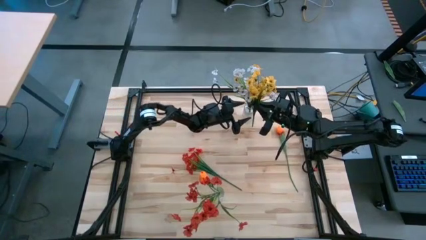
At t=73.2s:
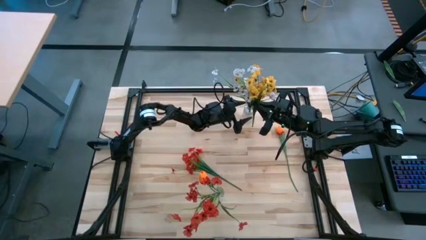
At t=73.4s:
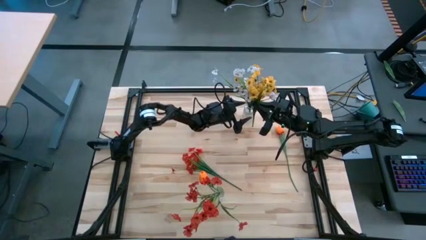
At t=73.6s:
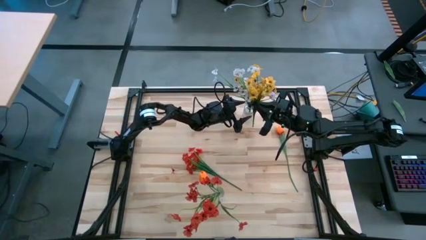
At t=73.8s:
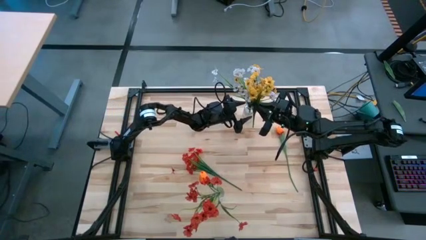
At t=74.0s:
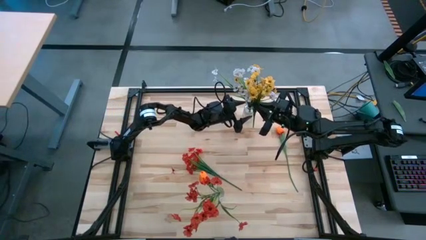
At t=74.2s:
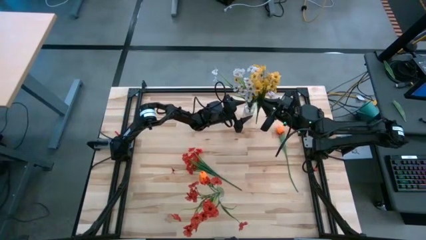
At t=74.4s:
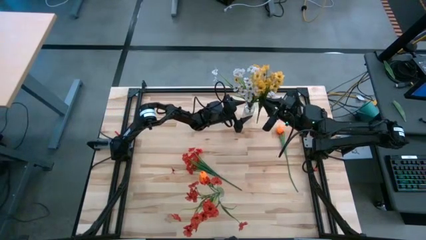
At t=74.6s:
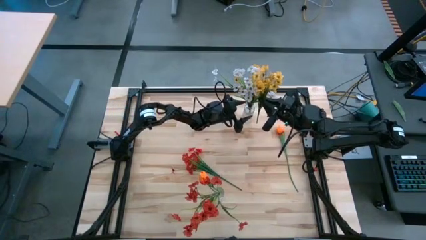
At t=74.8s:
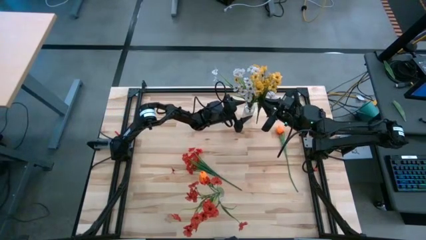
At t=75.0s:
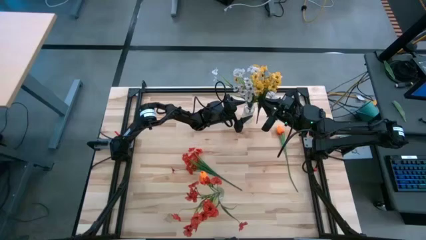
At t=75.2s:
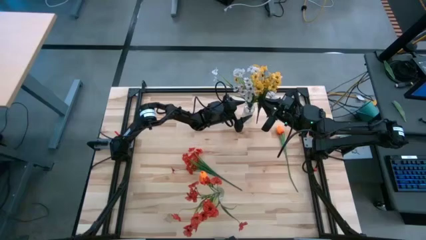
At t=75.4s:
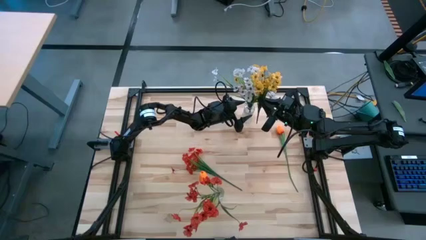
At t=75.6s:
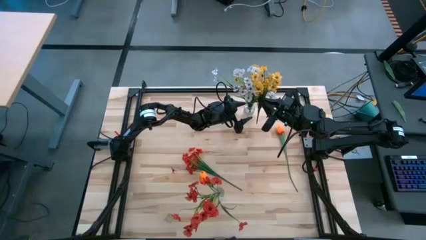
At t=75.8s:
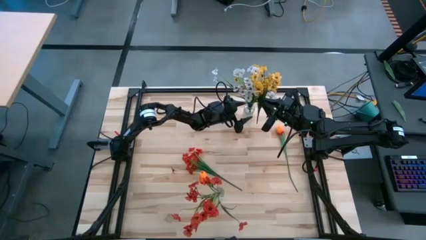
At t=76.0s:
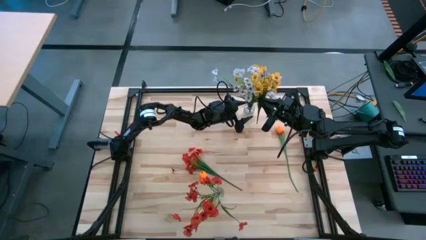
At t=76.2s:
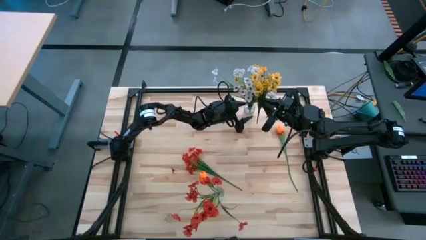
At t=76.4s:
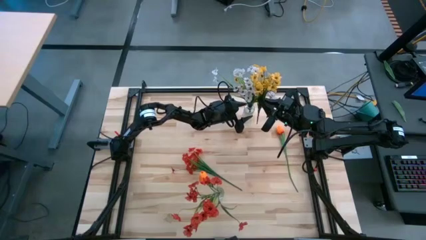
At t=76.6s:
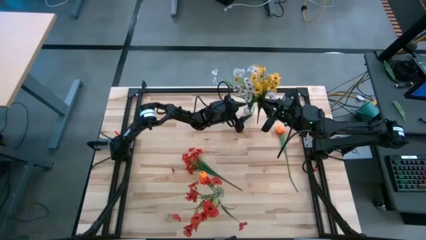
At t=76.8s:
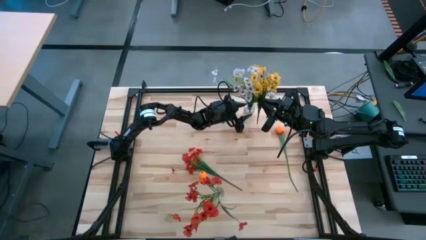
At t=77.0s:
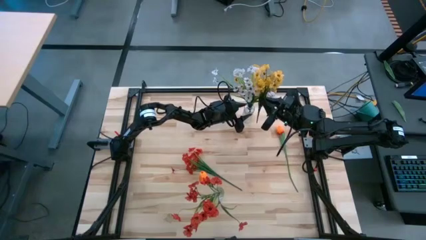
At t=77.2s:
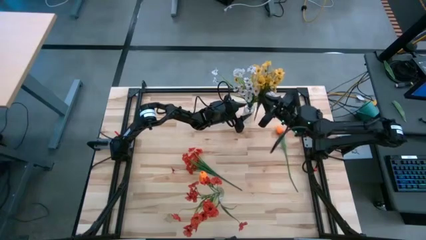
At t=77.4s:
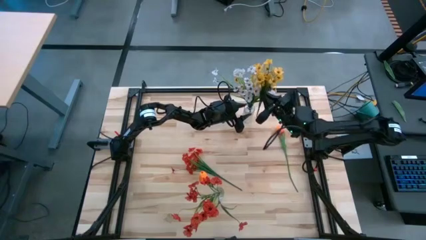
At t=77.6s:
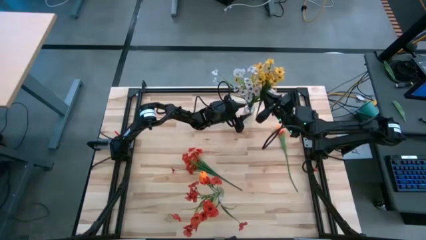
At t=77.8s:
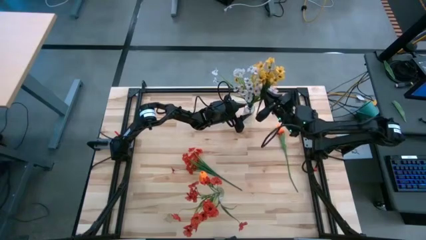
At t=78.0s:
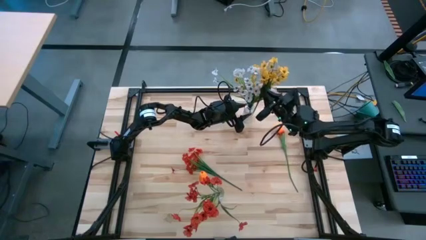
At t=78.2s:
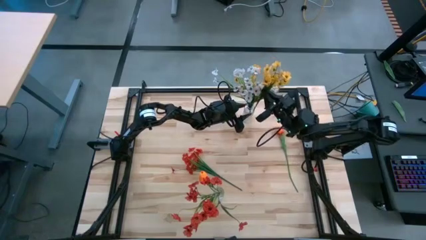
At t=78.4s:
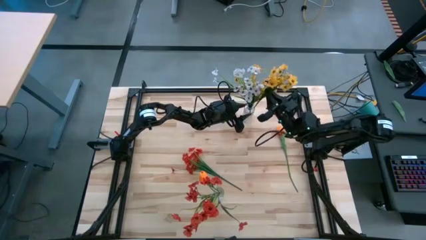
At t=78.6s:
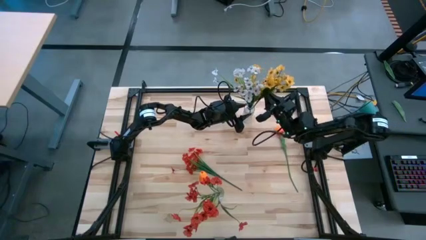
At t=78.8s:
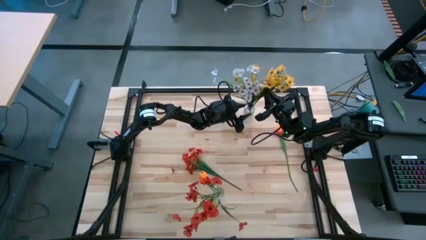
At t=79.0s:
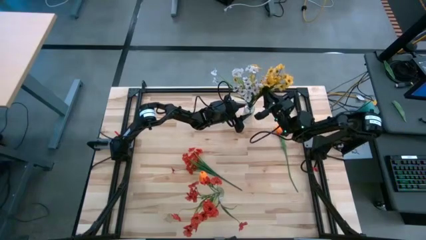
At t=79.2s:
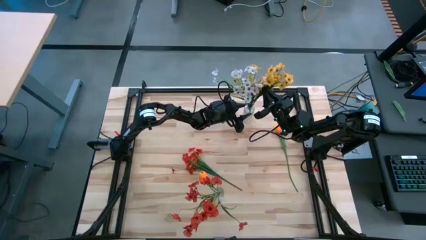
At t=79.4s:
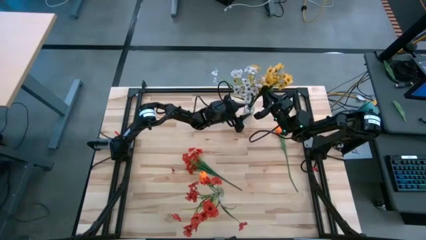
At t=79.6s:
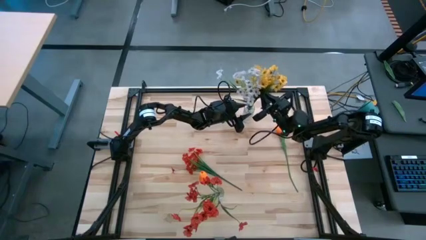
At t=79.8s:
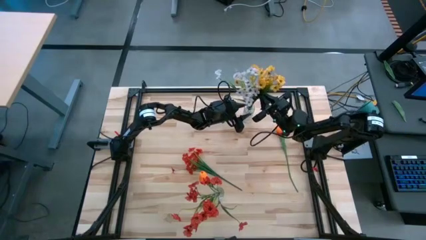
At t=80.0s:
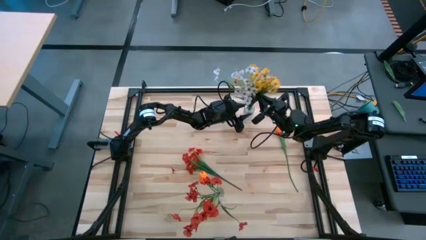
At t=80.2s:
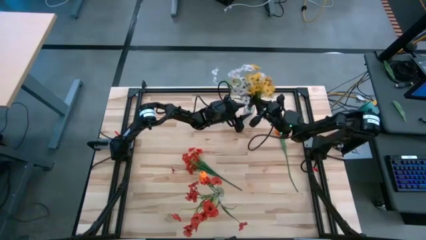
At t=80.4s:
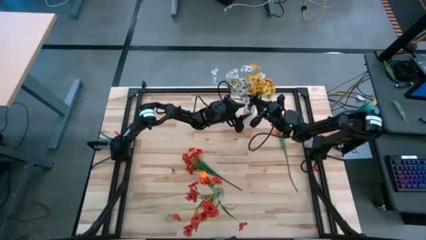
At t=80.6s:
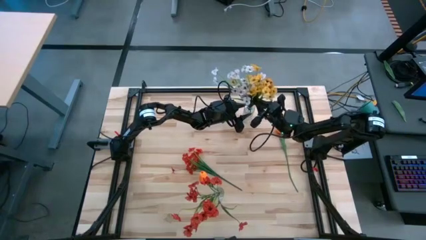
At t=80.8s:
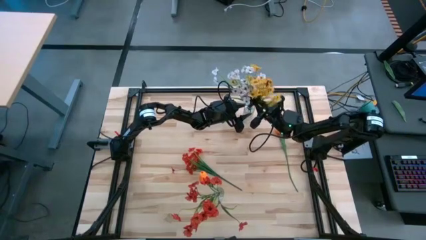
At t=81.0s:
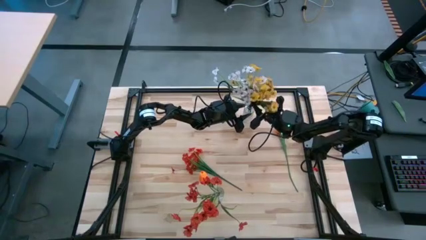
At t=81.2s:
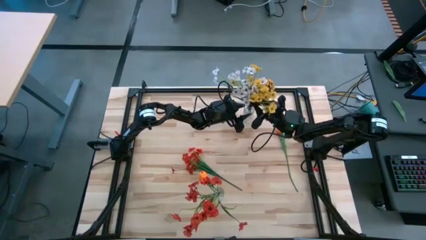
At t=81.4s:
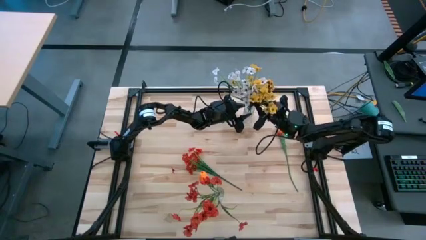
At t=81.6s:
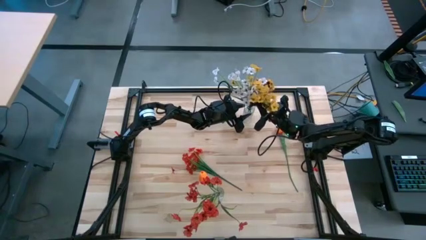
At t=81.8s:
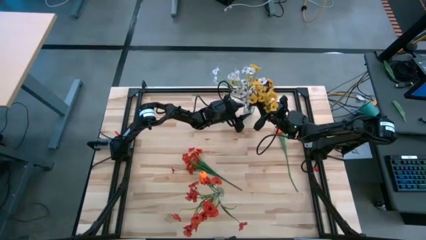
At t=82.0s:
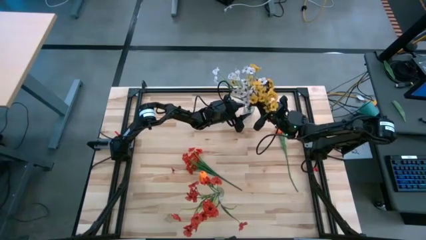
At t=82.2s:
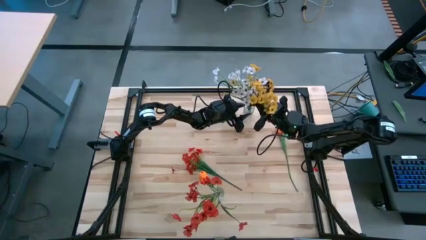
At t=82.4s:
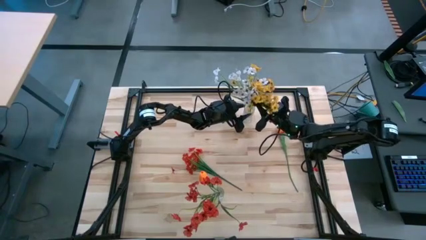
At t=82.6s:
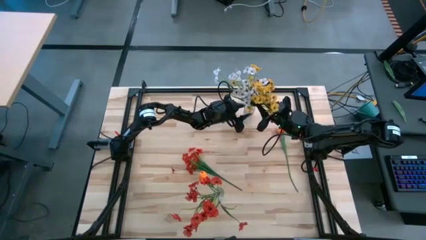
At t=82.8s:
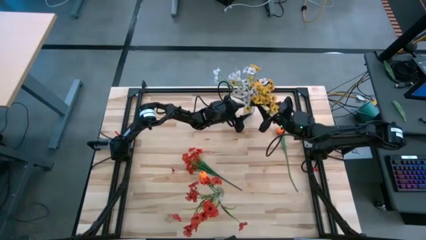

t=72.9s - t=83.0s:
Task: Sort flowers into vase by color
Put the yellow flowers into the top transparent vase

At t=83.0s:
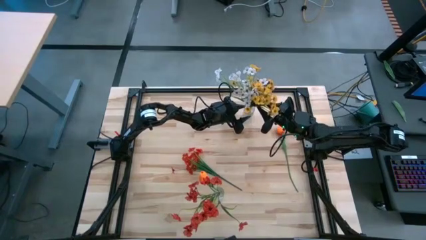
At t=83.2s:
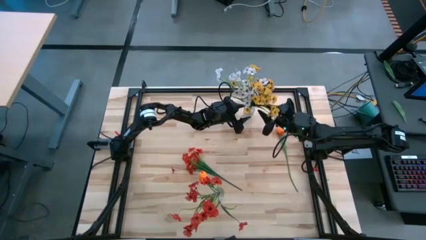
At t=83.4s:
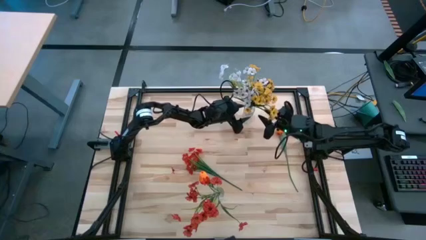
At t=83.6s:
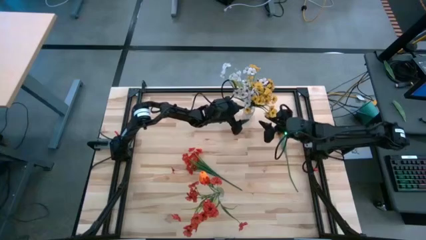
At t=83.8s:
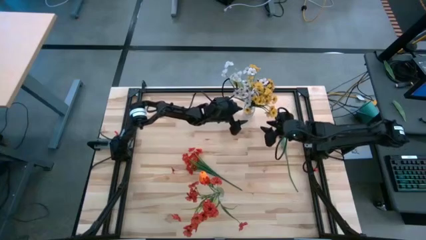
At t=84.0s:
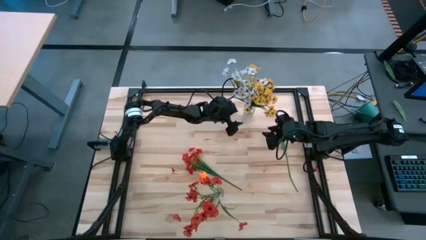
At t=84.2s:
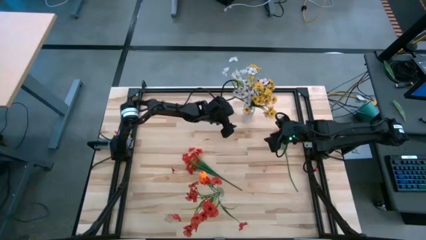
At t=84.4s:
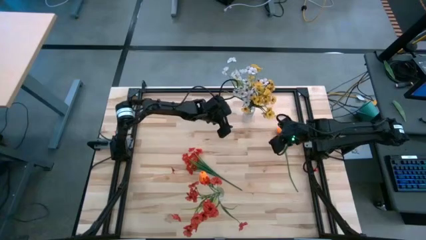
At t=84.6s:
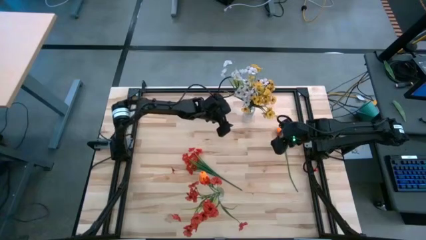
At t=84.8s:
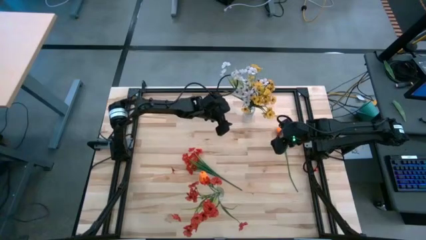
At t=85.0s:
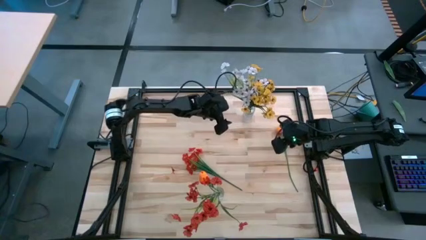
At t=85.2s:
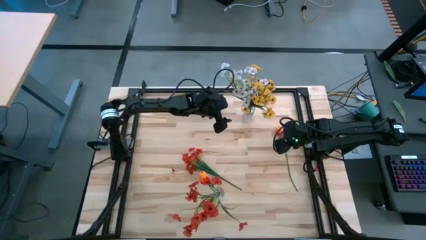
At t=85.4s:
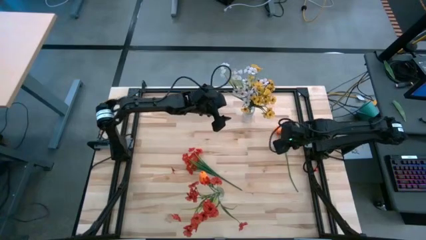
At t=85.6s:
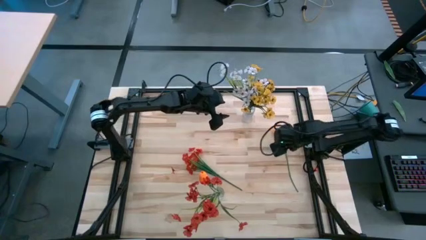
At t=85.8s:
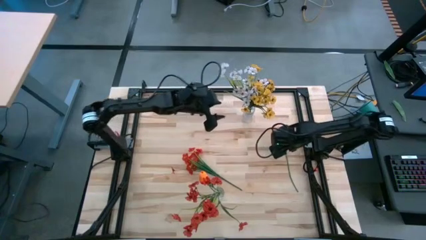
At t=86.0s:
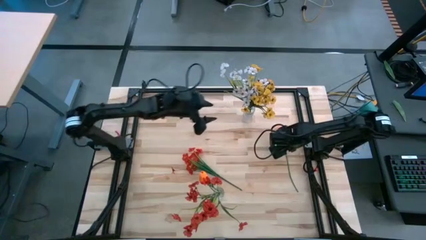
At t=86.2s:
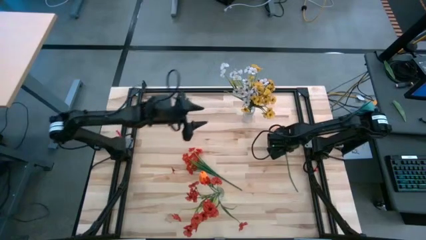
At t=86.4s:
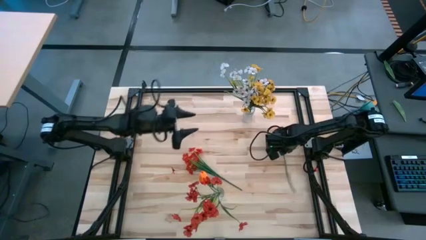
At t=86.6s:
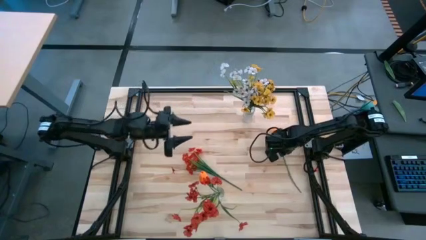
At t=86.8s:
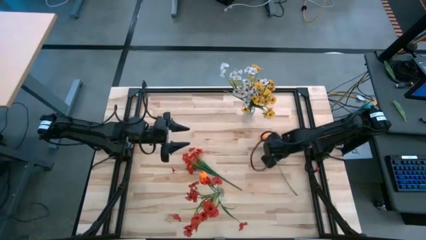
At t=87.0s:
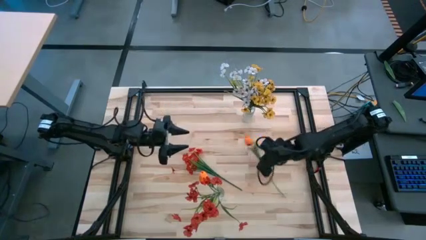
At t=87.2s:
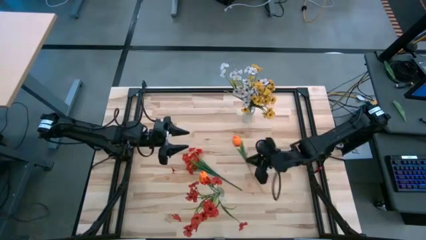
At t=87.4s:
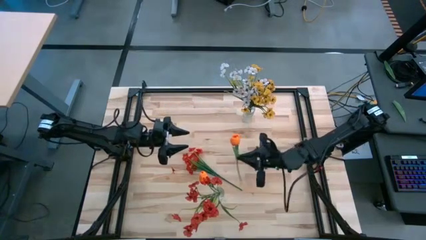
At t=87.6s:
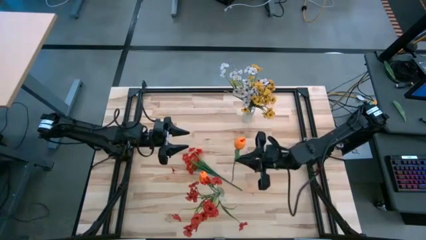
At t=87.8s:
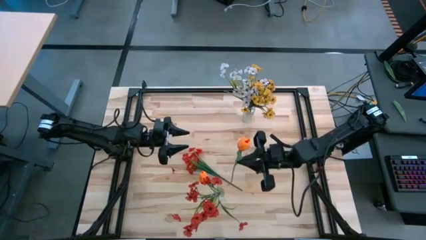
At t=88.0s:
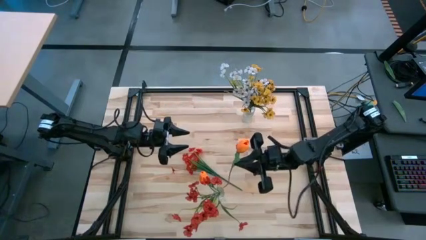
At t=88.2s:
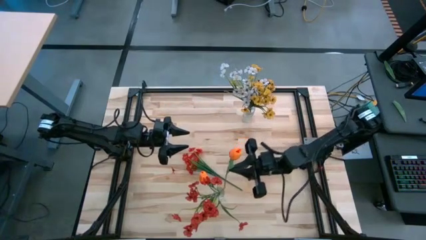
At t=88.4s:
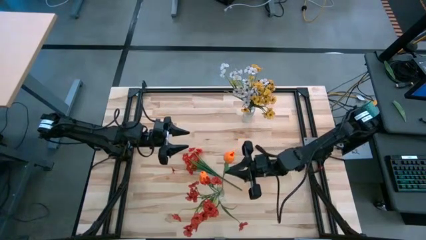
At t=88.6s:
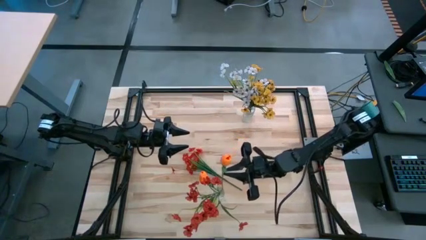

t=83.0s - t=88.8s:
Put the orange flower into the bottom transparent vase
